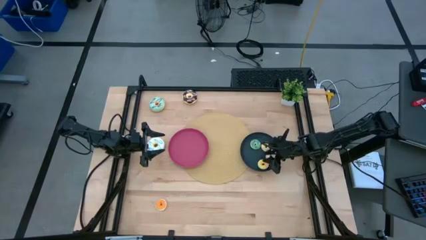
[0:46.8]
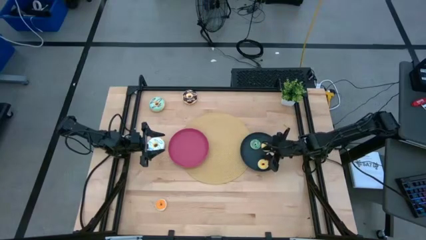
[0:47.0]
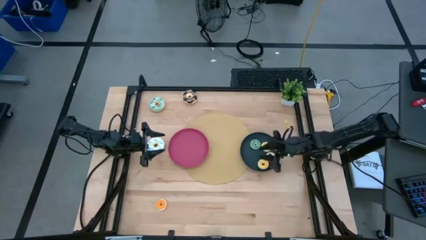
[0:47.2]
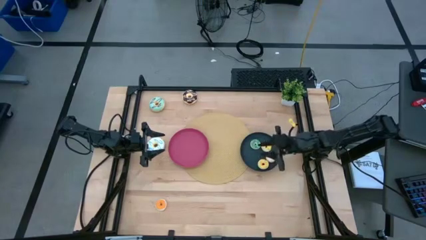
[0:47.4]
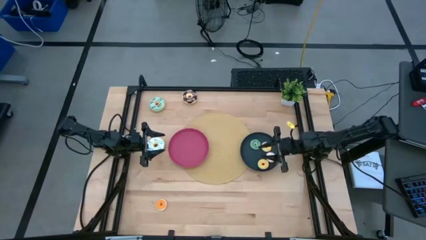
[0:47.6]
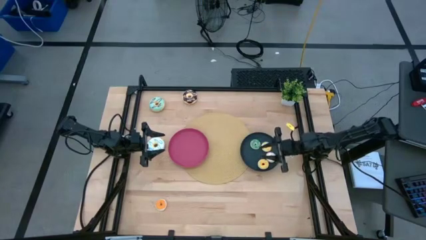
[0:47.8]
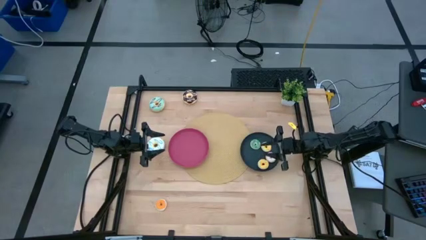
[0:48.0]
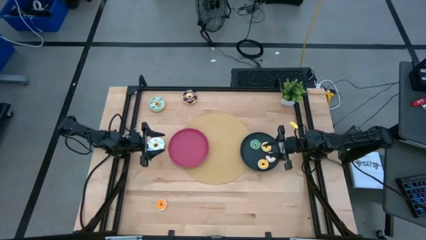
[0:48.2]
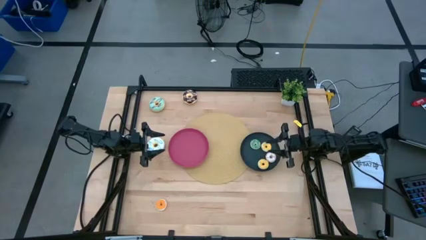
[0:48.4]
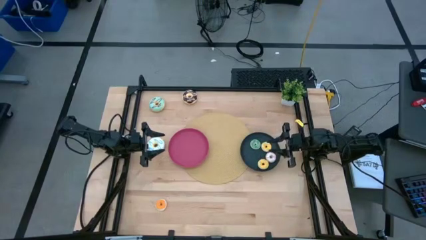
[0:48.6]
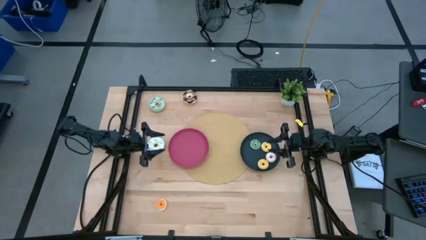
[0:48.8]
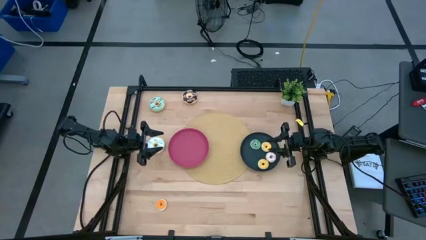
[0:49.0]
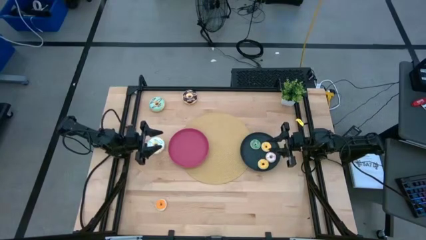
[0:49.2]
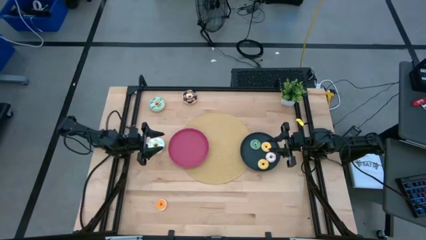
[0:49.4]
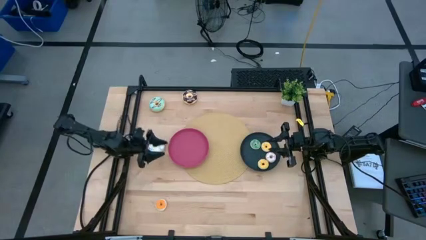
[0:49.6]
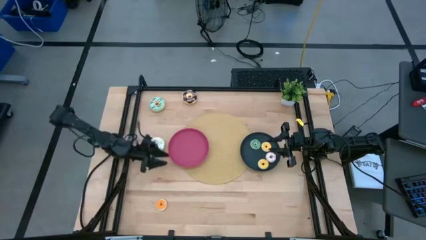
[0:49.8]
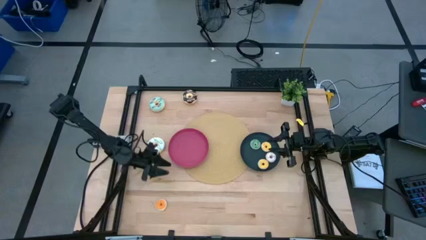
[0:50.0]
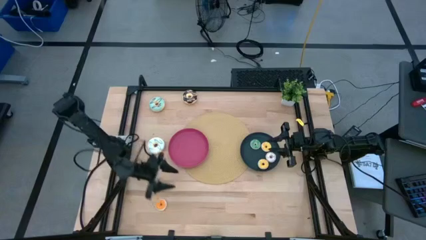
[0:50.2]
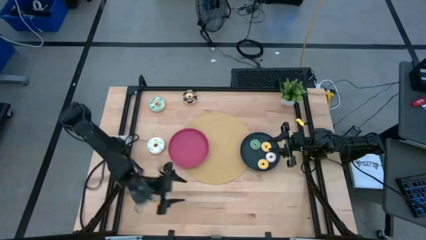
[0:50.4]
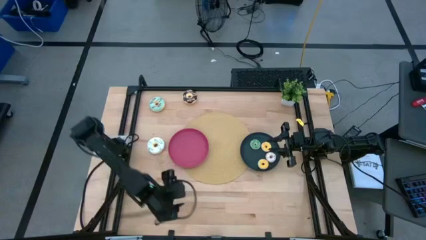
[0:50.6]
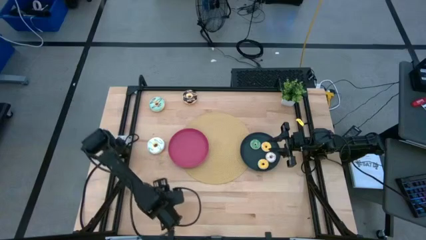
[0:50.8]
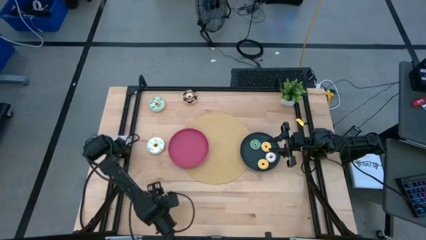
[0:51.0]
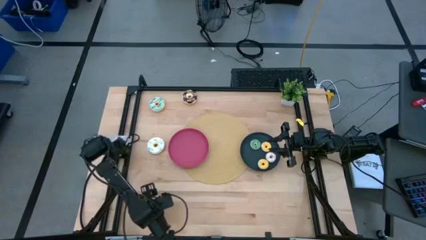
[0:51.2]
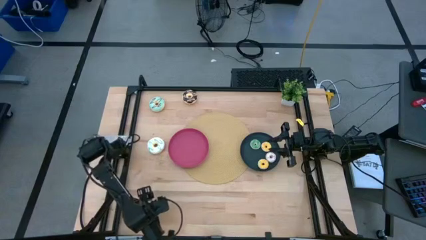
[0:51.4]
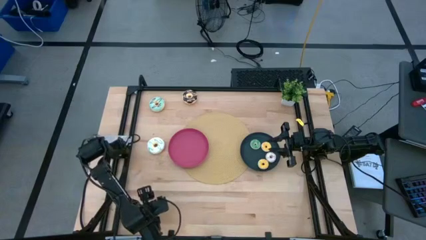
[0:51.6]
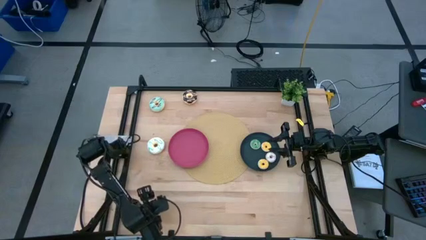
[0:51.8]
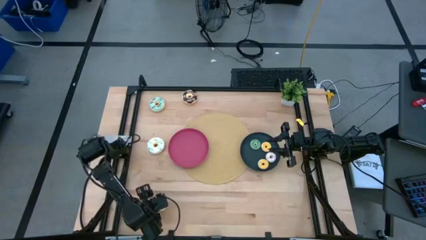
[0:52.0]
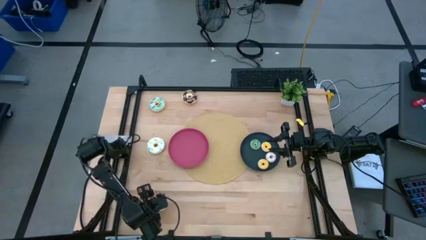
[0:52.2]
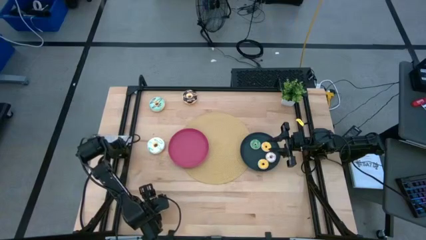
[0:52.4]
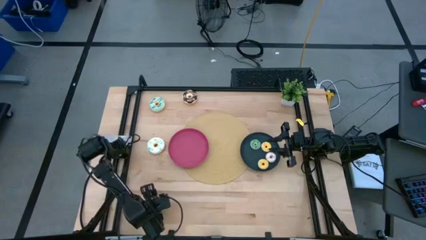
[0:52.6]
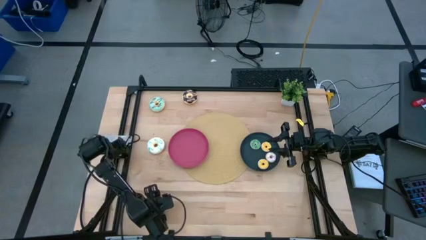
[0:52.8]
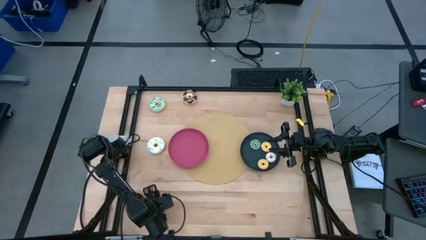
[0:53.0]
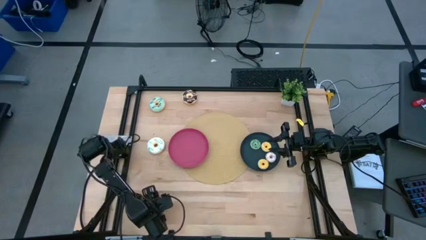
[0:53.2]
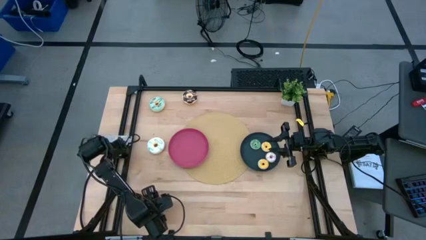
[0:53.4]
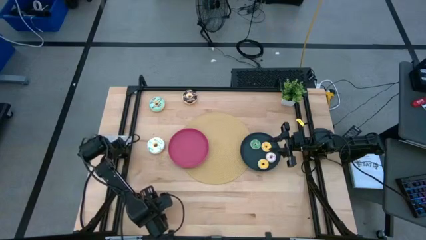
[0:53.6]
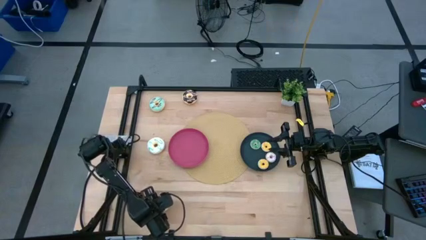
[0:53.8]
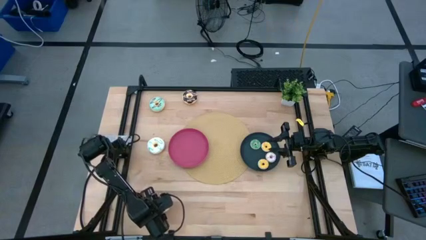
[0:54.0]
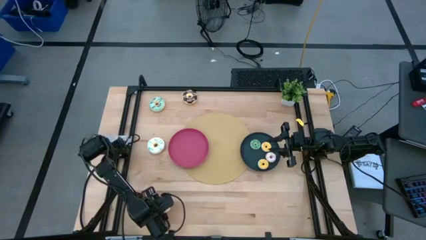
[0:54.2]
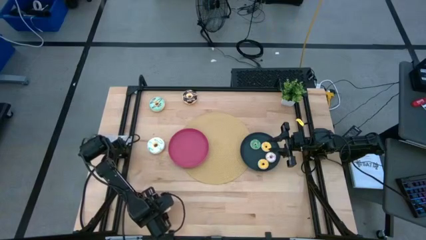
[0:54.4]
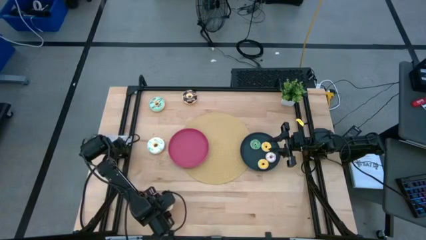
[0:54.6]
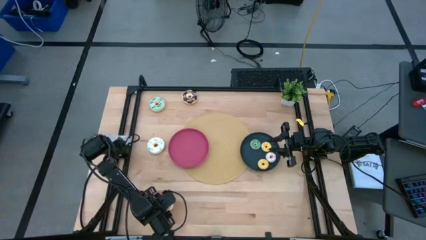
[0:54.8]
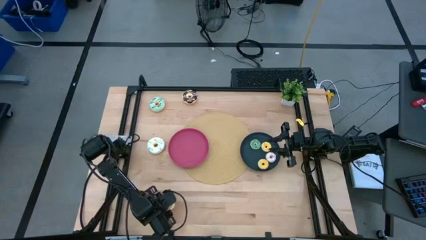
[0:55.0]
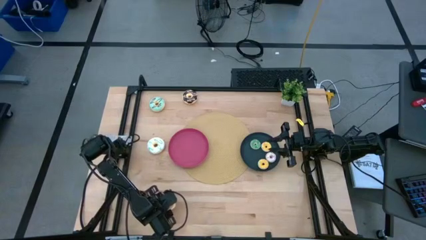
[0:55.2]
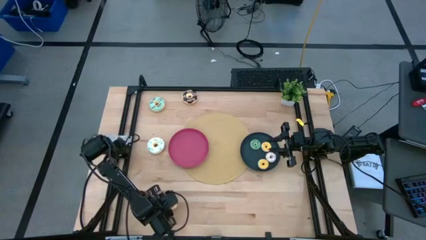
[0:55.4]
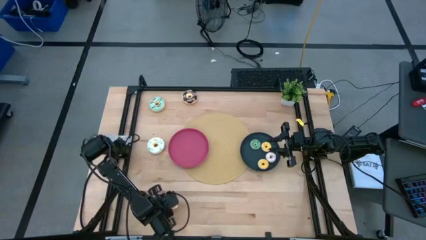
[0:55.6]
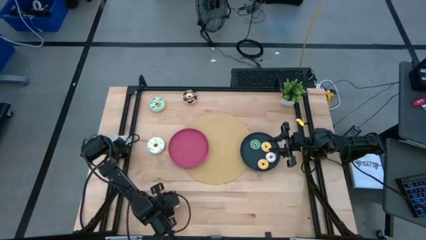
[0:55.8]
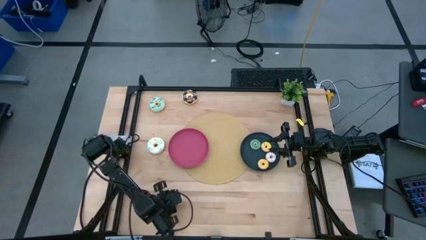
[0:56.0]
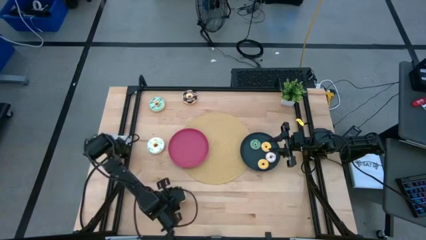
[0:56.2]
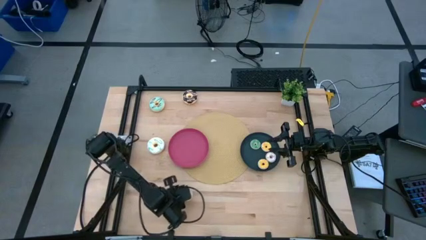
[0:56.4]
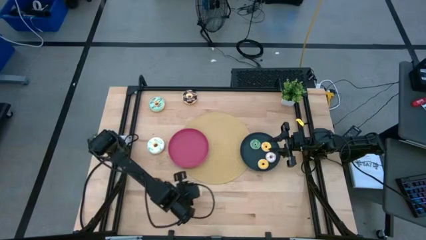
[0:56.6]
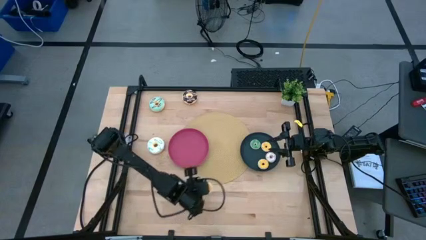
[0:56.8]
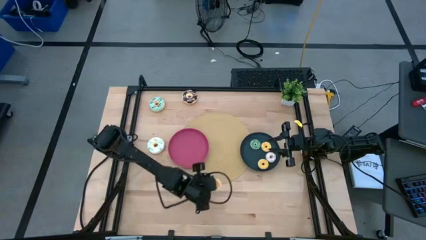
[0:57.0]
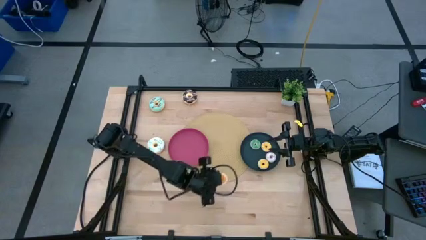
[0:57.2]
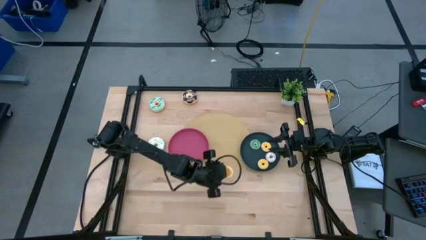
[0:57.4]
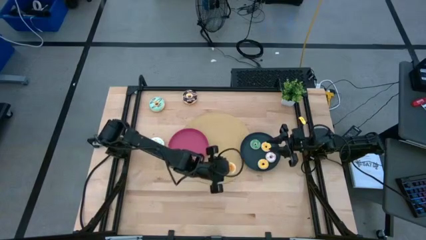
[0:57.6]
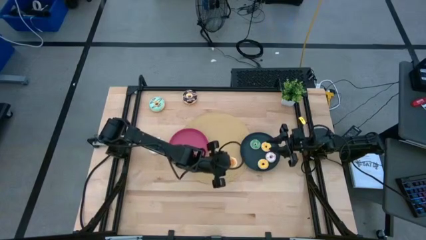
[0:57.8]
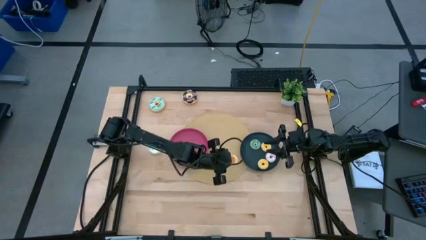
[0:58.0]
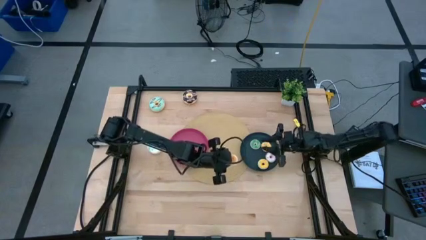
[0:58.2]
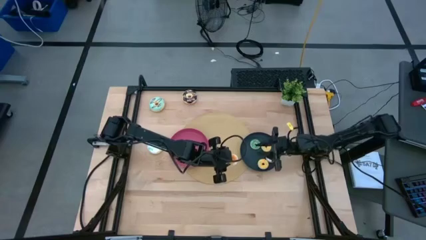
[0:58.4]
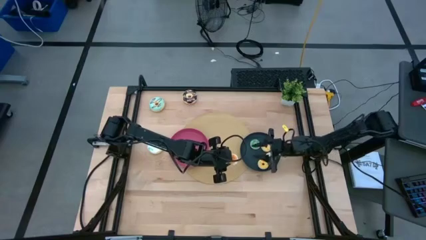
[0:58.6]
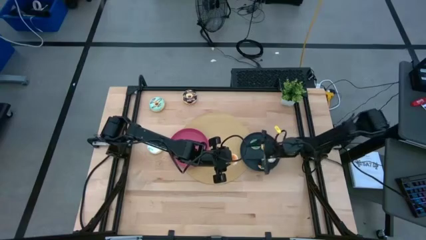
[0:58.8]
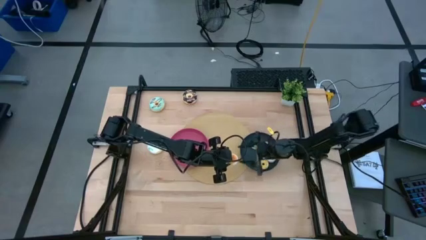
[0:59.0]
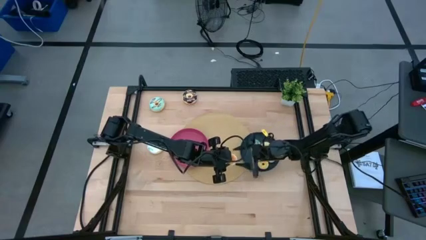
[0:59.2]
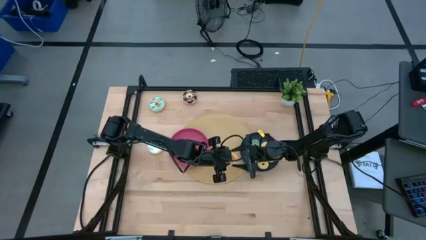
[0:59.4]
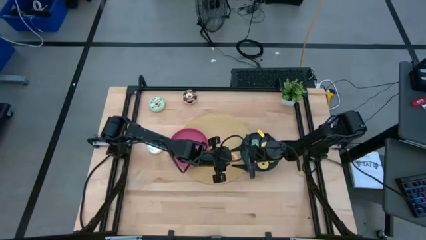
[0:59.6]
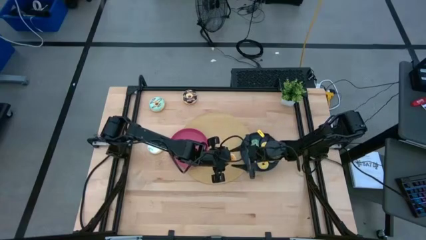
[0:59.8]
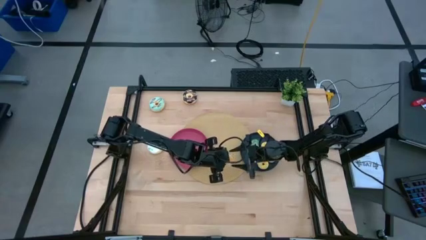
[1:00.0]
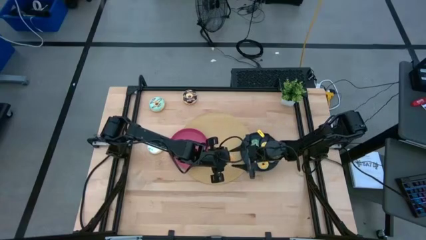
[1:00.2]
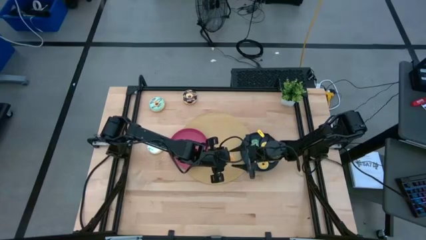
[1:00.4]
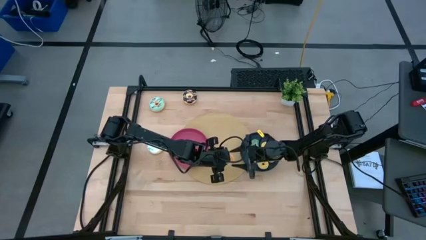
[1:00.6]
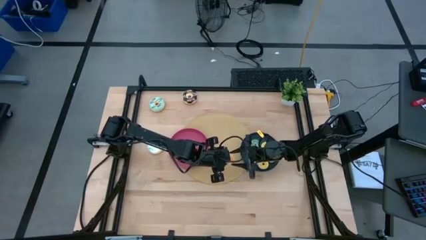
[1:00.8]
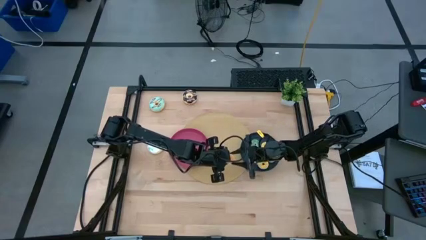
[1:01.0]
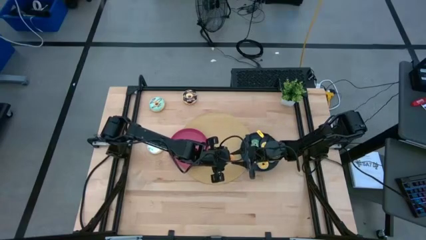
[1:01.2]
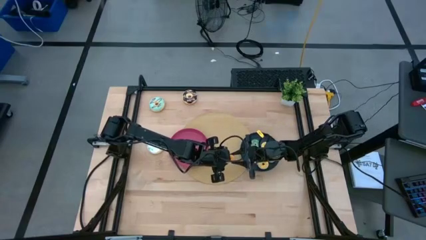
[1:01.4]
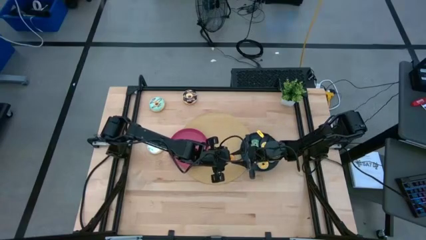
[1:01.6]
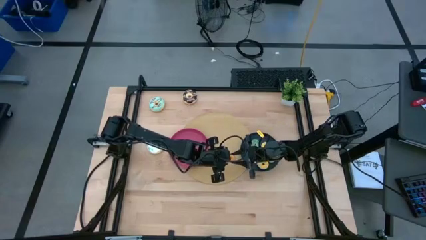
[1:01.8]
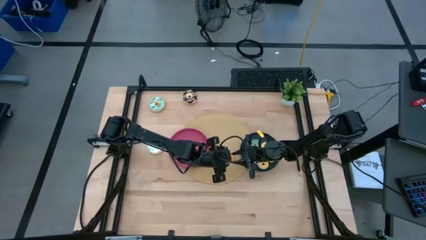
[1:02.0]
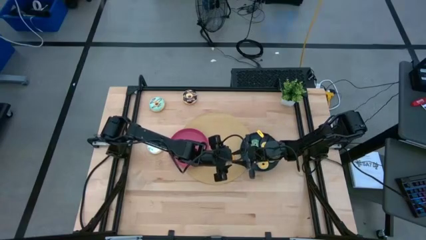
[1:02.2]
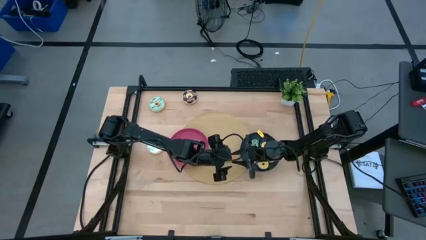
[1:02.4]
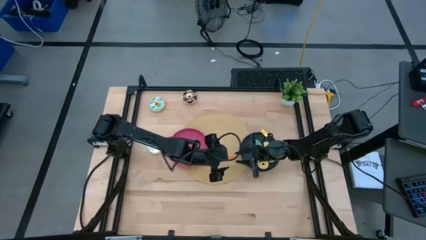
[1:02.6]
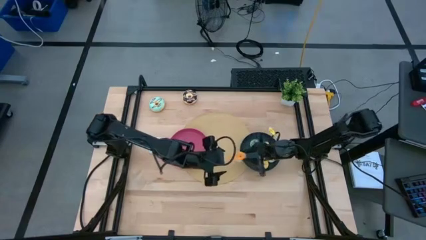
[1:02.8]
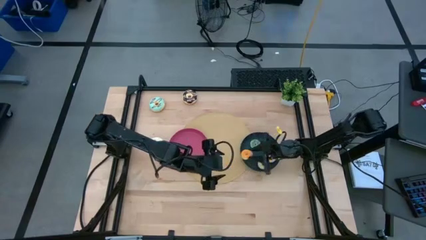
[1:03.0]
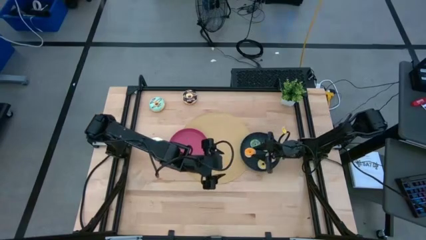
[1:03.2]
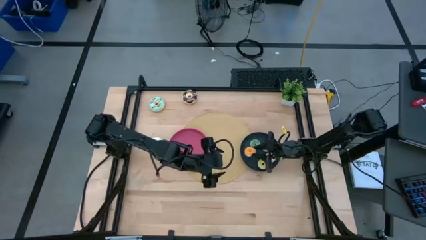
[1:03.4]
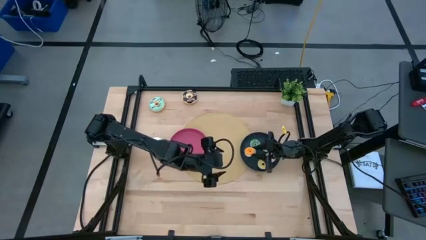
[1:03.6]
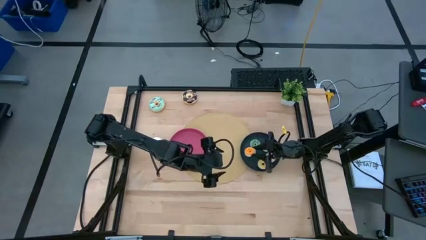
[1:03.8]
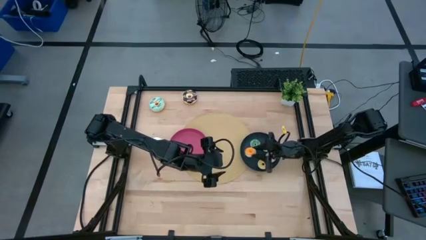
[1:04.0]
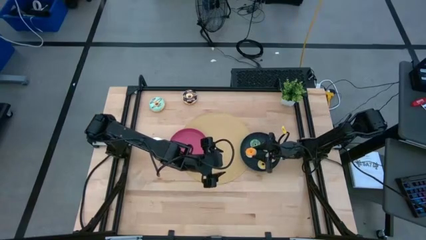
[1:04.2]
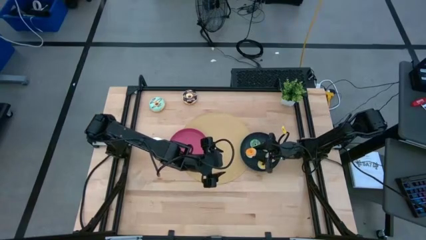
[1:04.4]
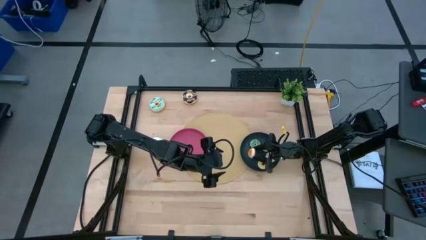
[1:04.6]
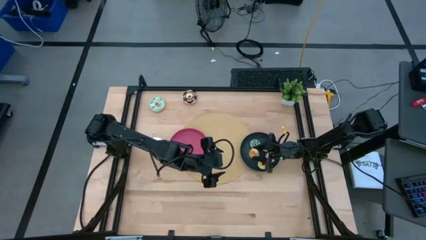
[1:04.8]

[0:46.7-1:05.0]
Task: Pick & Place donuts
Put the small orange donut on the black plate
